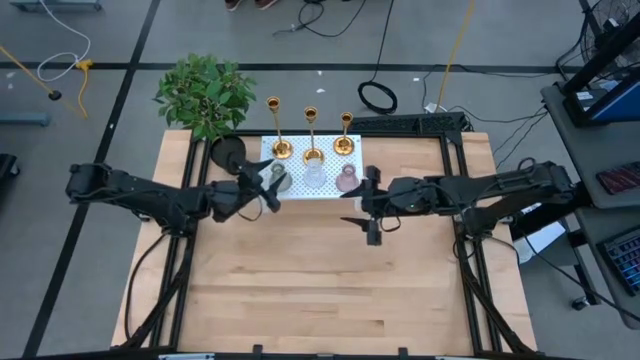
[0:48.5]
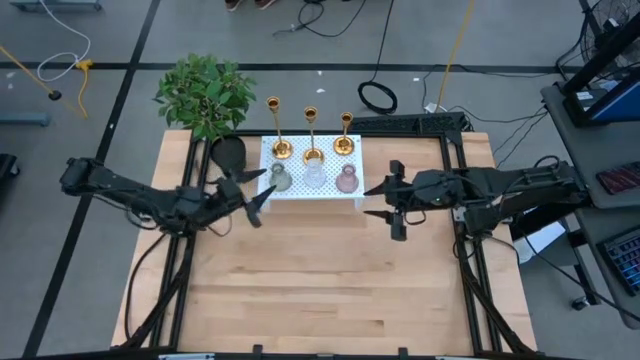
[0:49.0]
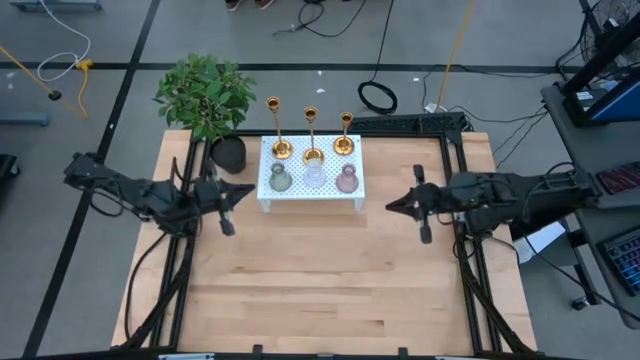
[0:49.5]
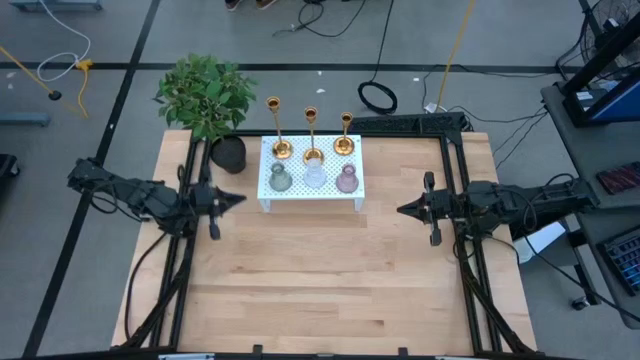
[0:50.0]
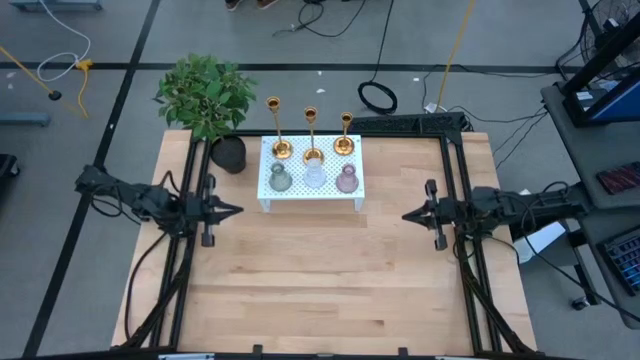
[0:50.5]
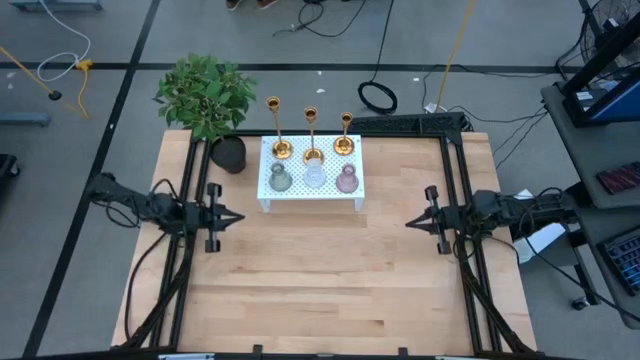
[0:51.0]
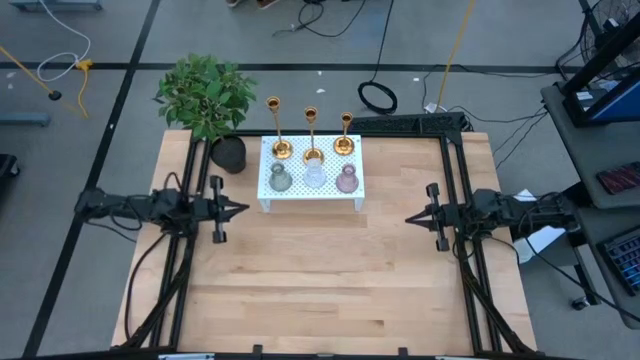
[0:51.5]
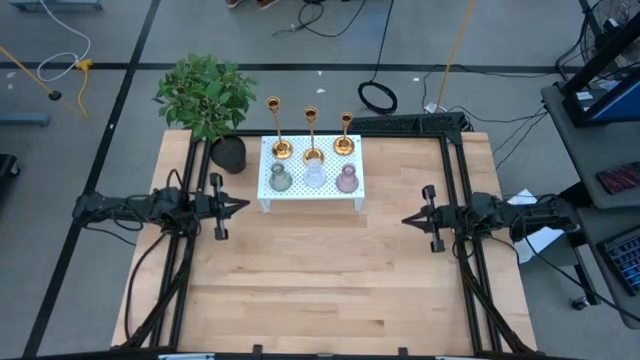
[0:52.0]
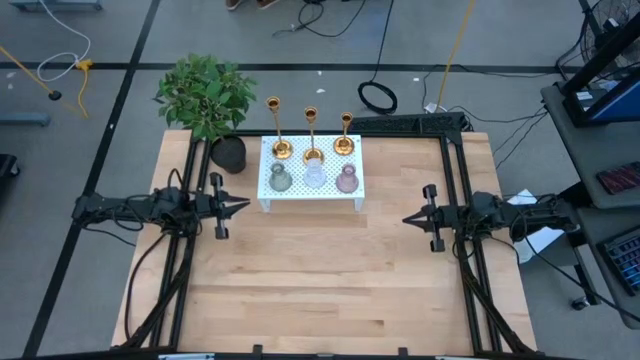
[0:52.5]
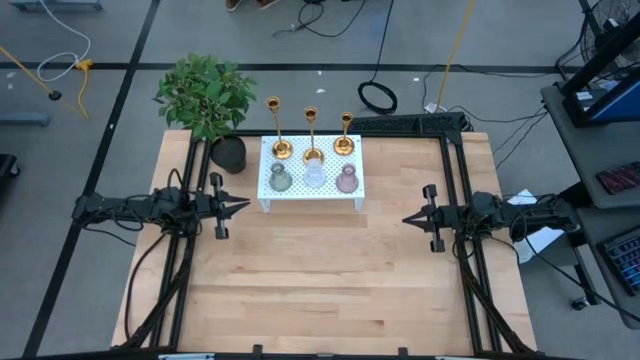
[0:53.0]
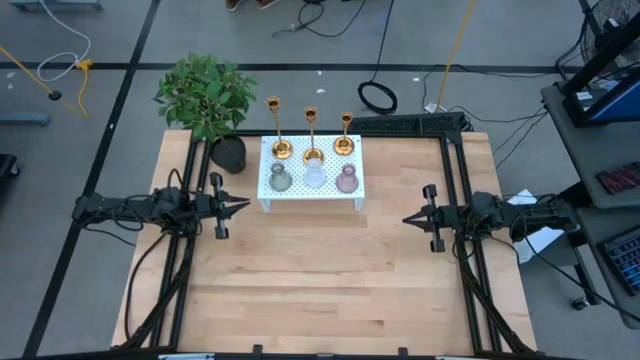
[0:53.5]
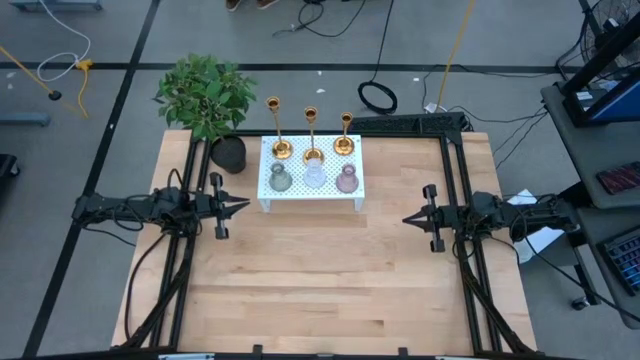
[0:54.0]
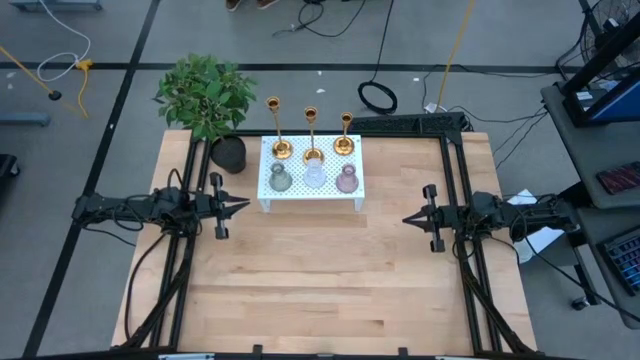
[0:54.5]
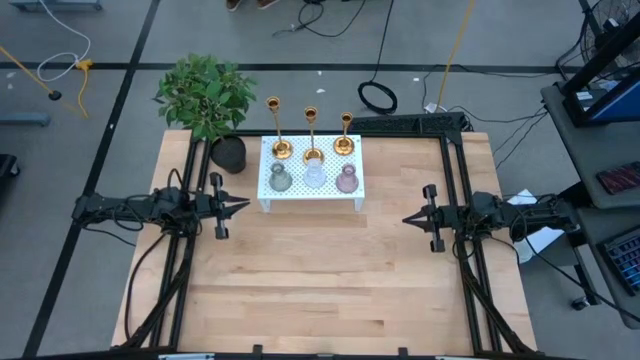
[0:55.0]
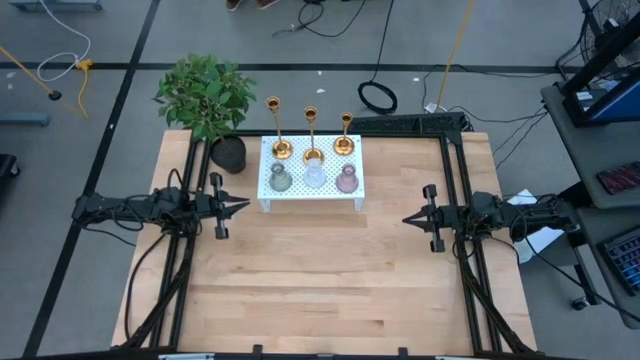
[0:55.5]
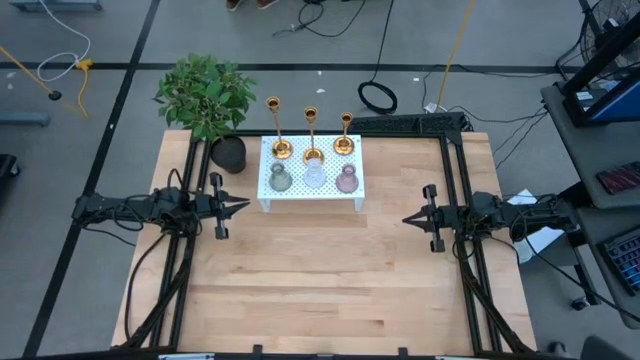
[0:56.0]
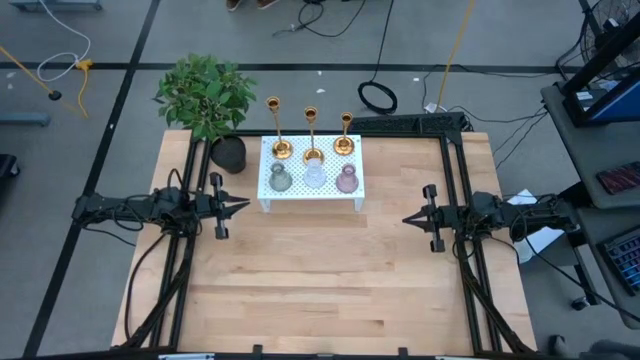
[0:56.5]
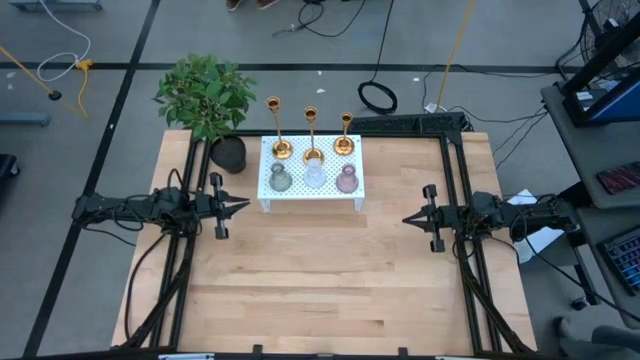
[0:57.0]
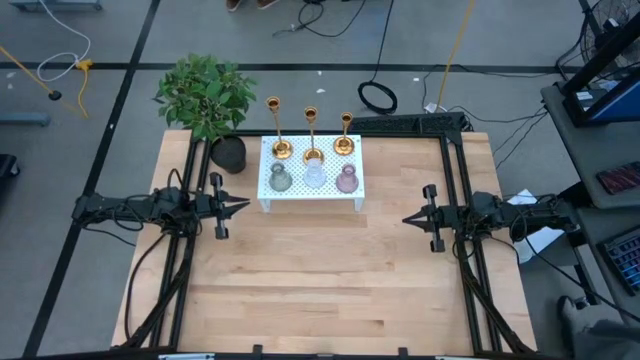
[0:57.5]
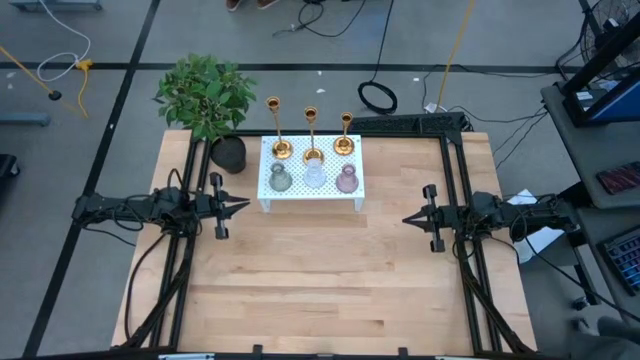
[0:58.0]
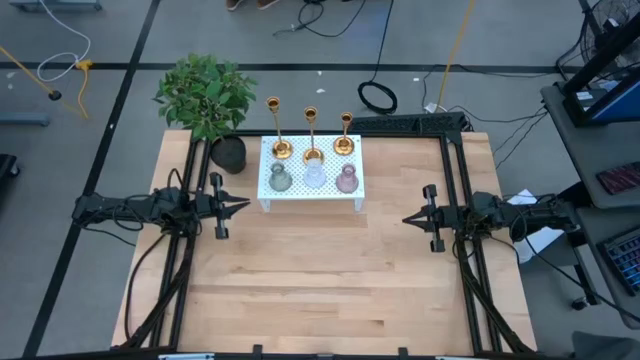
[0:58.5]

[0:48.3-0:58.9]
Task: Pick & Place candle stick holders
Return to Home Position

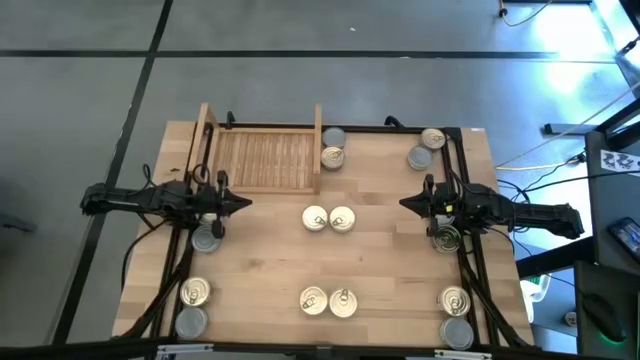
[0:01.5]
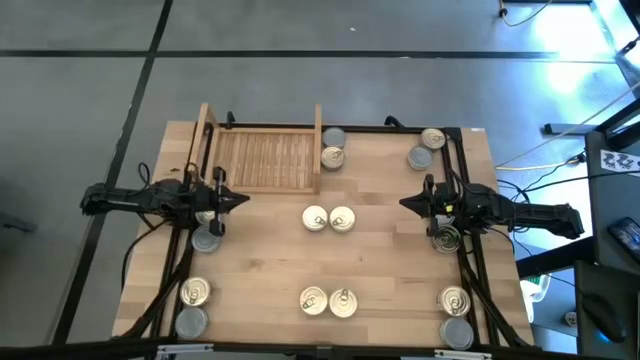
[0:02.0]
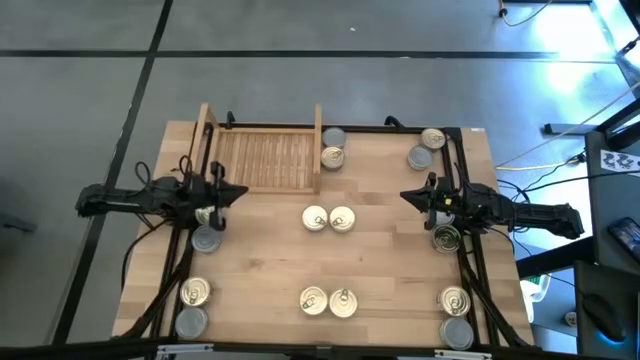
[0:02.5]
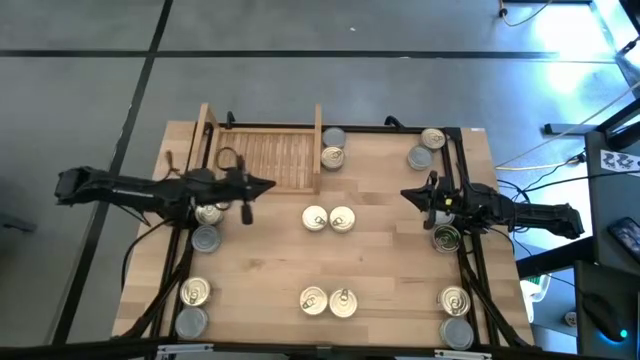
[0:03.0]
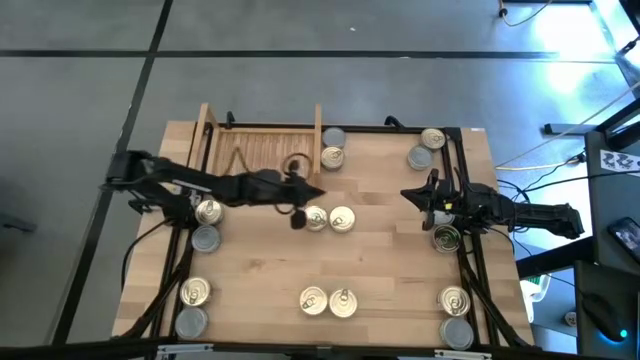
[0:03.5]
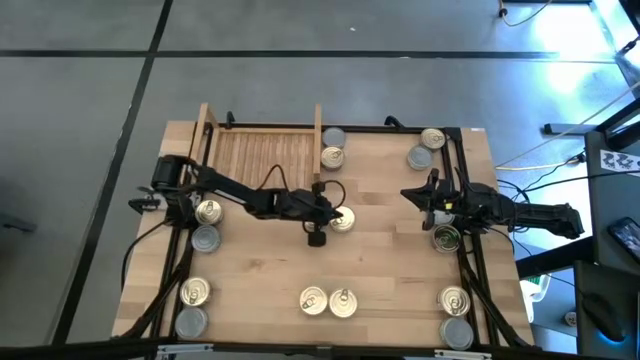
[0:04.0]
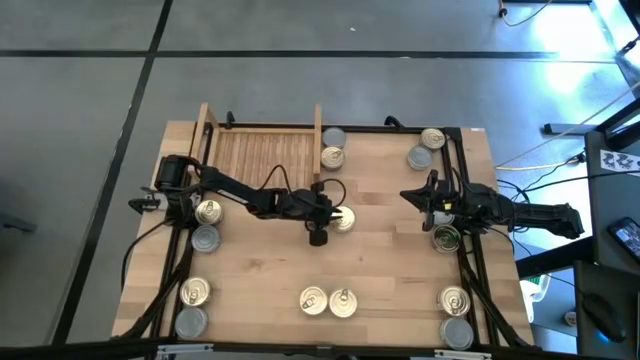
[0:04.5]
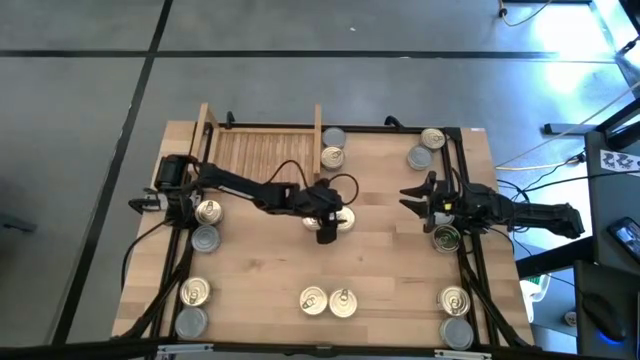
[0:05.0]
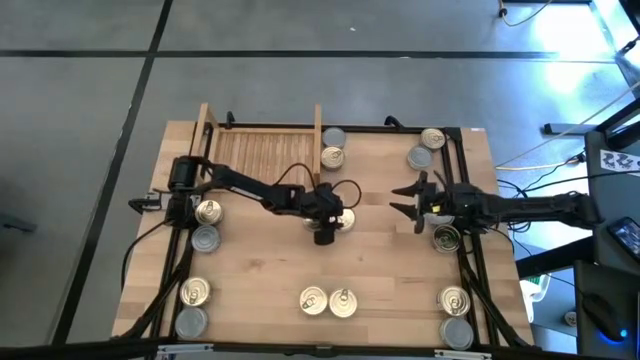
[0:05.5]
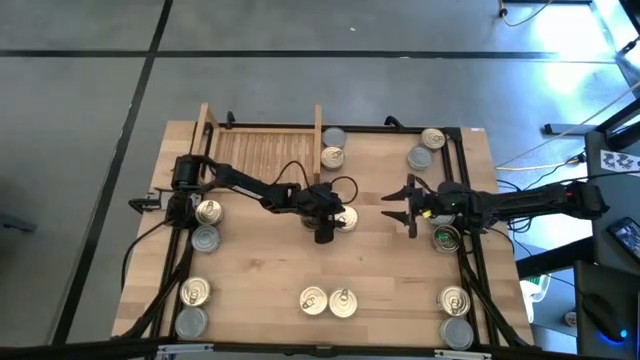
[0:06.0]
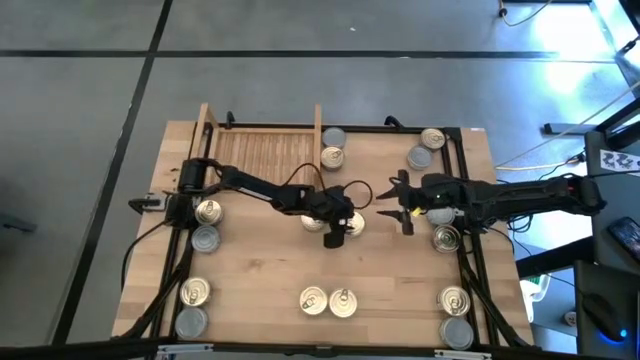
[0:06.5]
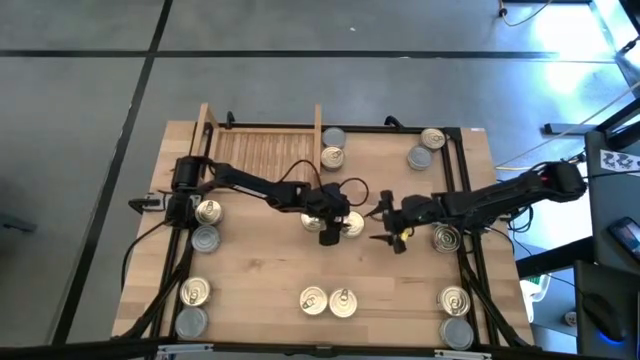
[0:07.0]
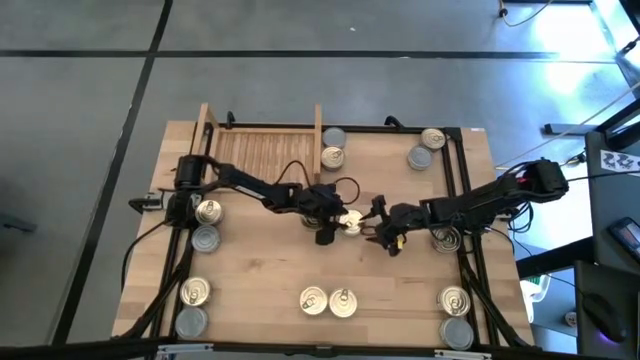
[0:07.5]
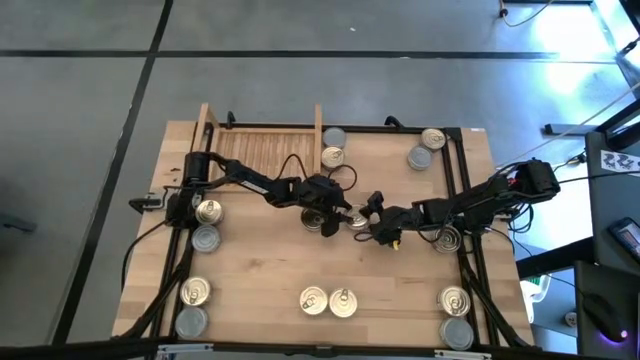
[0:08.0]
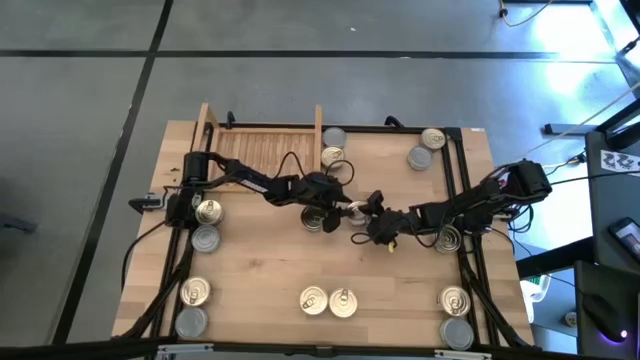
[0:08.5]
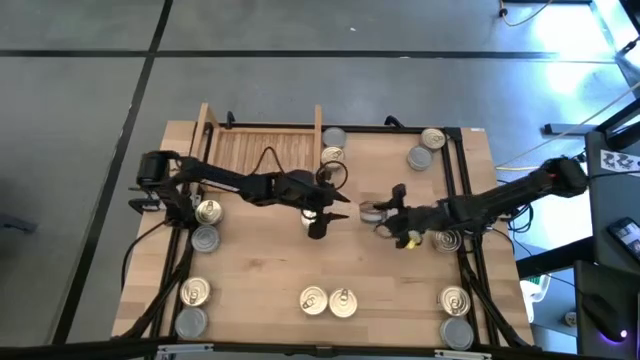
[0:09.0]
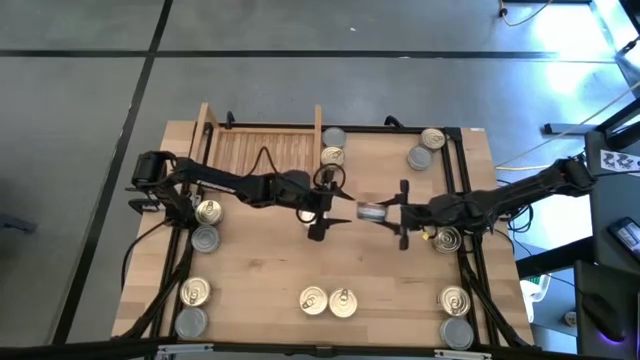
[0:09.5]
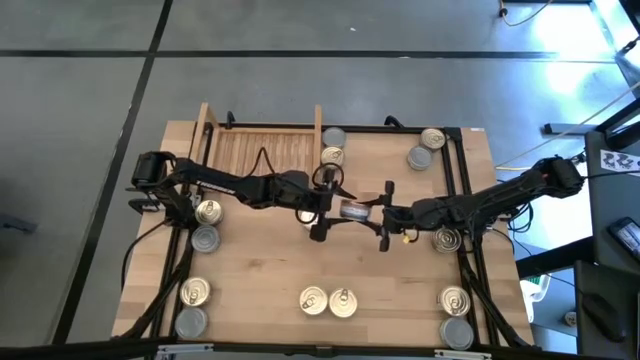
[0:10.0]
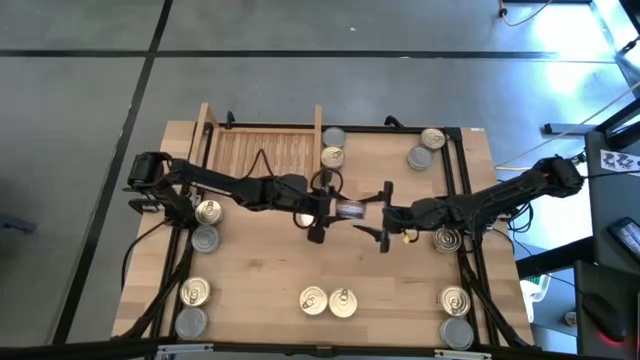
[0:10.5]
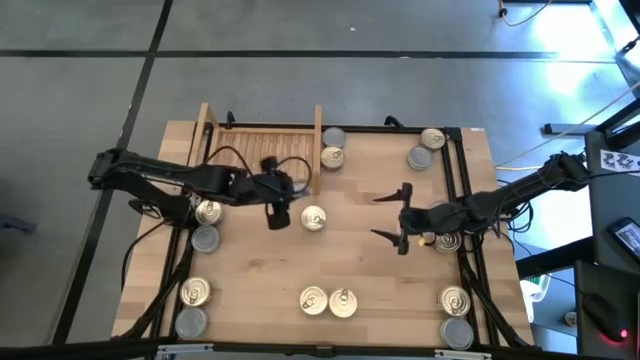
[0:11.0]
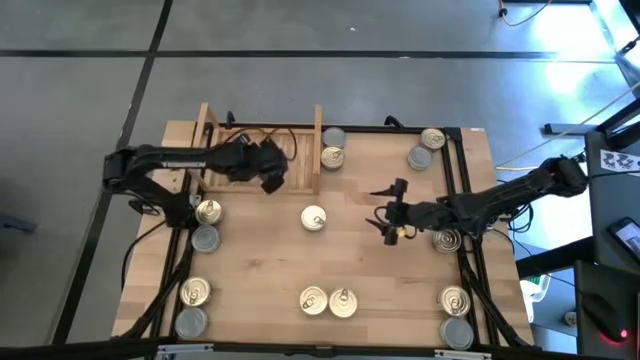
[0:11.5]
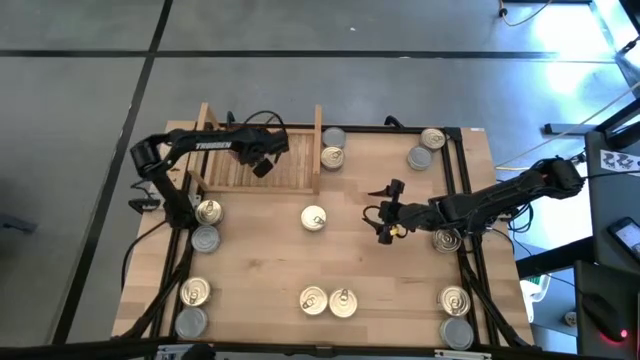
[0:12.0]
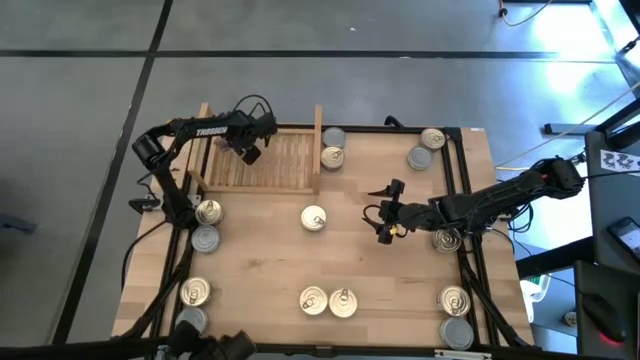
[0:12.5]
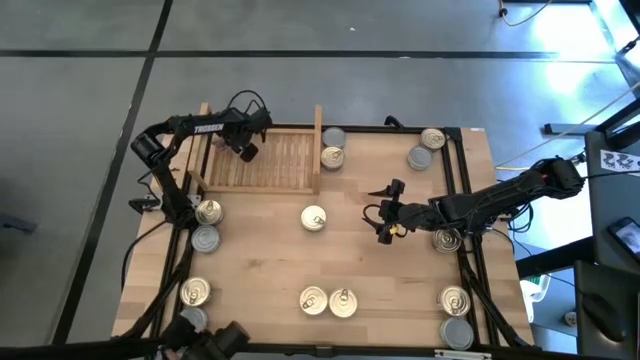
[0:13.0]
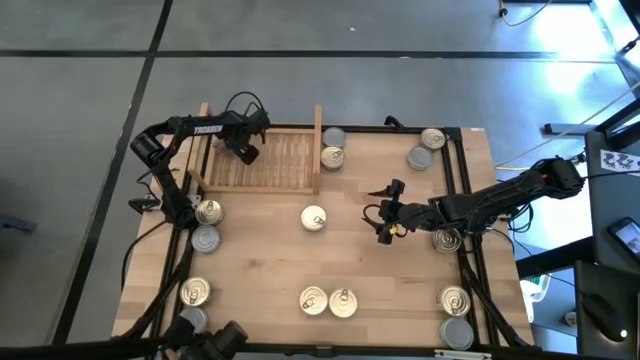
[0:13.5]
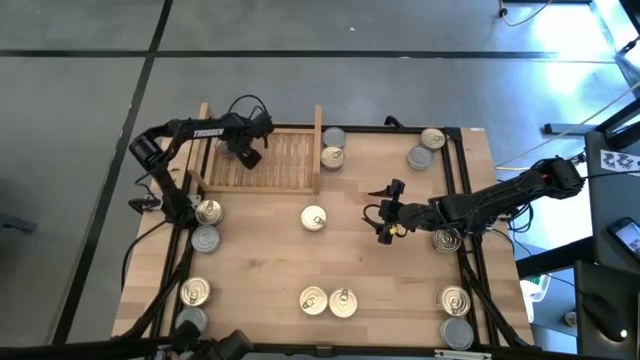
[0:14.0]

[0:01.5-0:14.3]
Task: Stack canned seafood by type on shelf
Put the blue tuna can on the shelf
